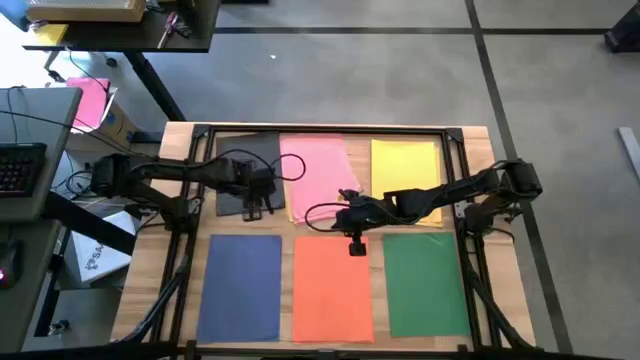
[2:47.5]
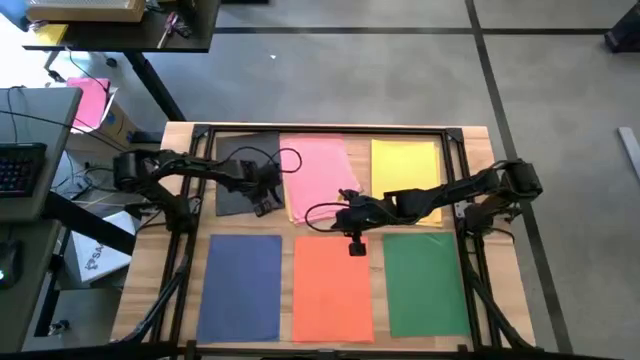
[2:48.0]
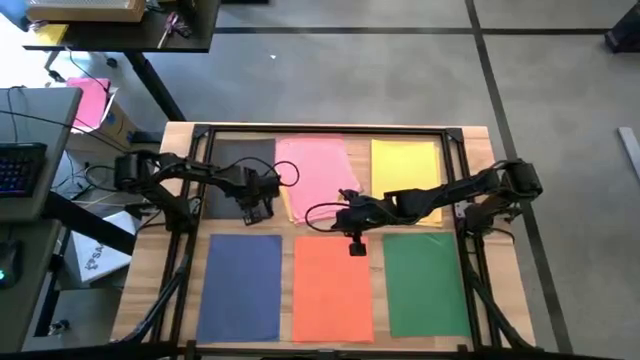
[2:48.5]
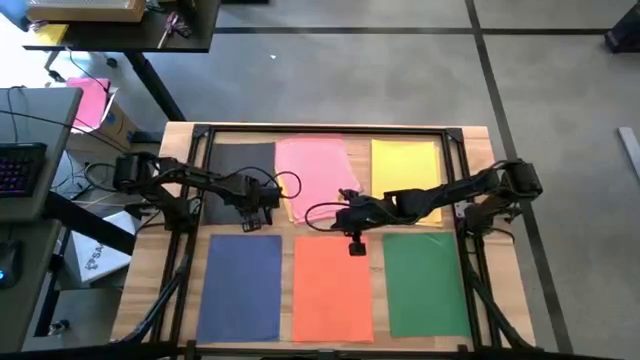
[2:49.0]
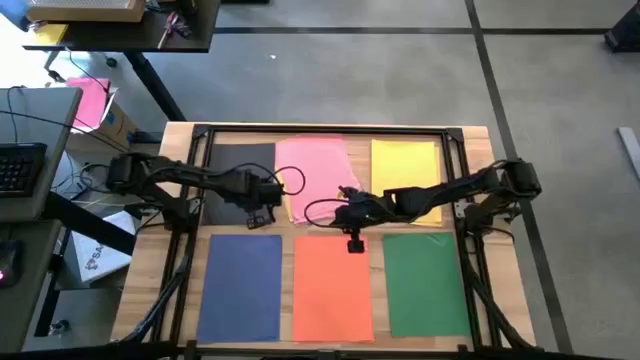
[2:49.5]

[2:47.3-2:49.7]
Task: Organize paper
Adjust the black paper

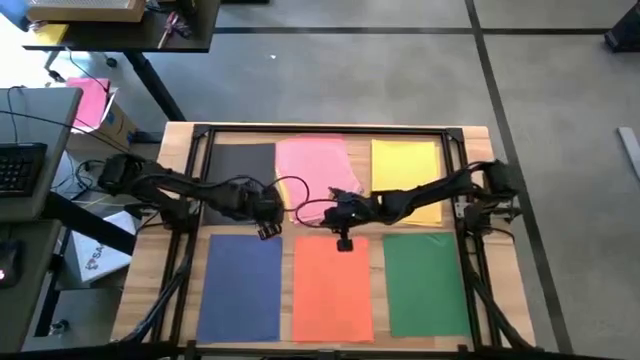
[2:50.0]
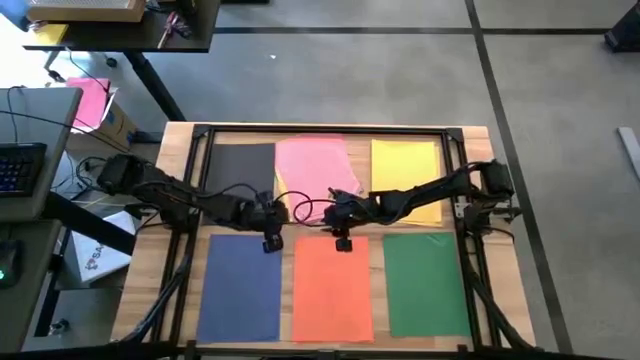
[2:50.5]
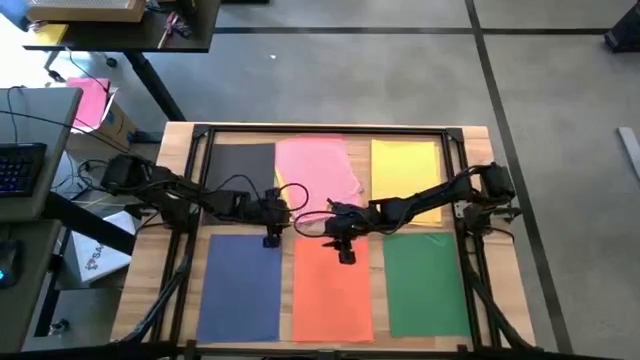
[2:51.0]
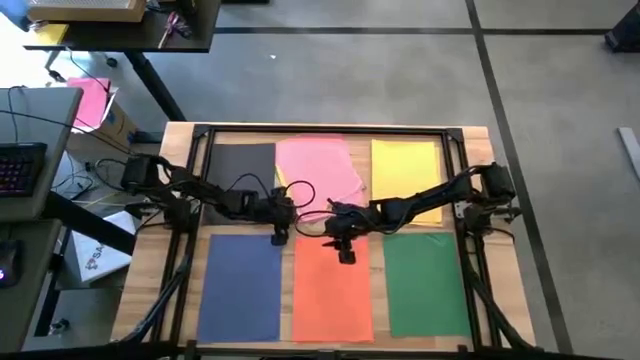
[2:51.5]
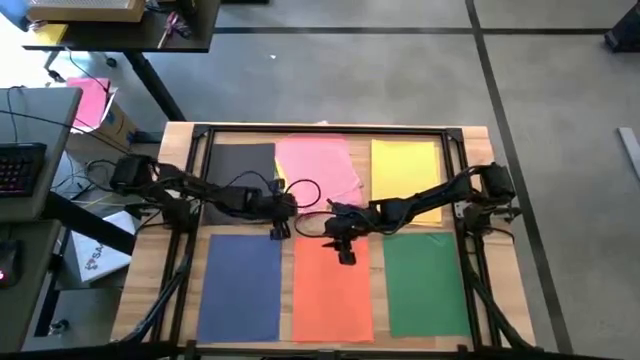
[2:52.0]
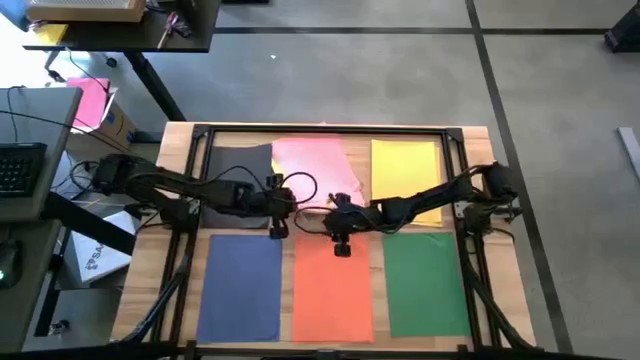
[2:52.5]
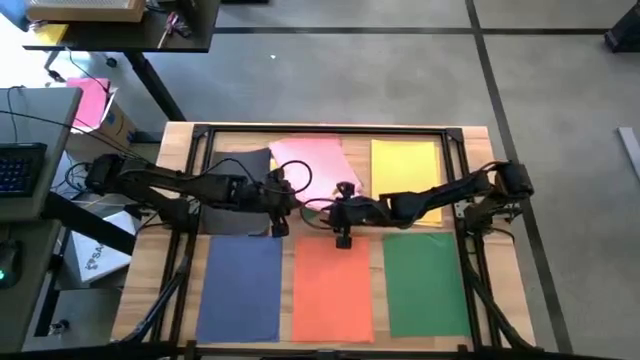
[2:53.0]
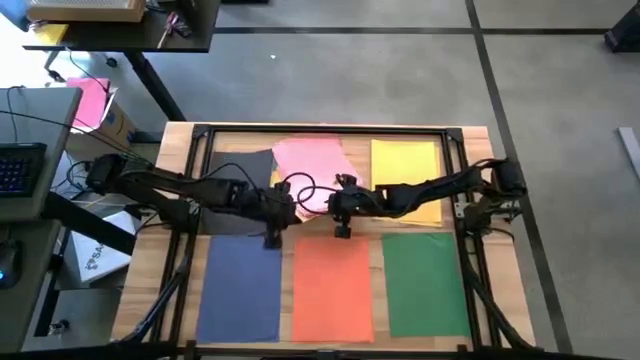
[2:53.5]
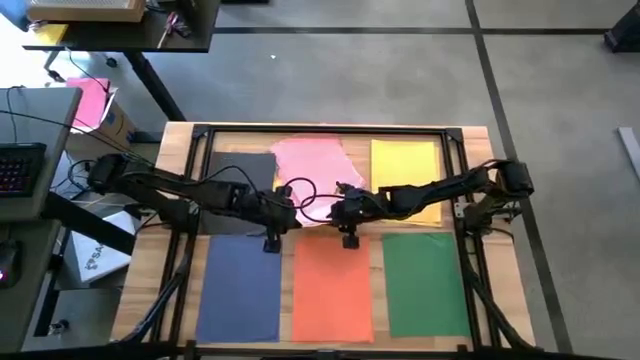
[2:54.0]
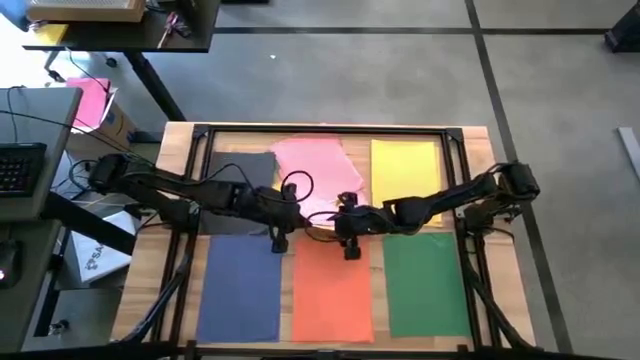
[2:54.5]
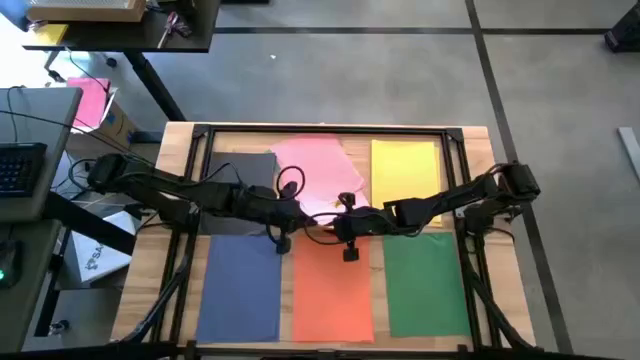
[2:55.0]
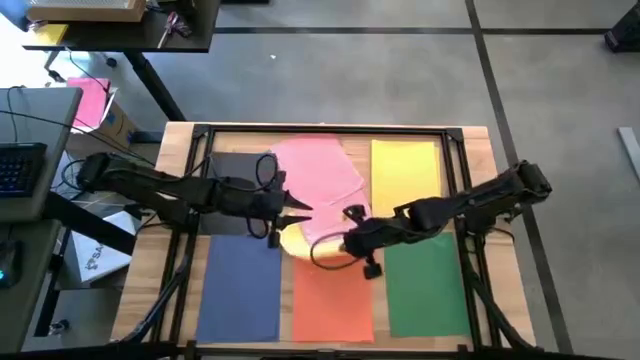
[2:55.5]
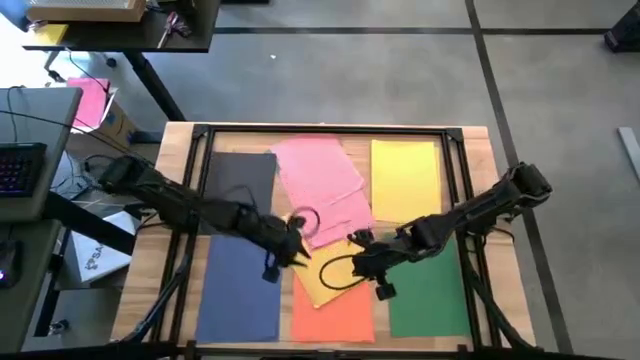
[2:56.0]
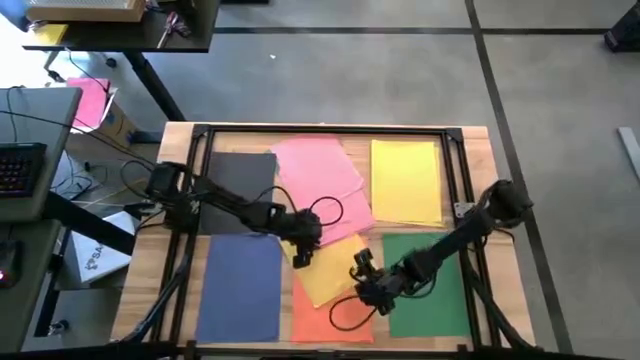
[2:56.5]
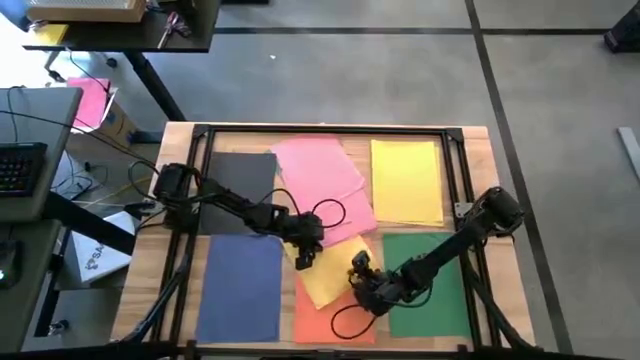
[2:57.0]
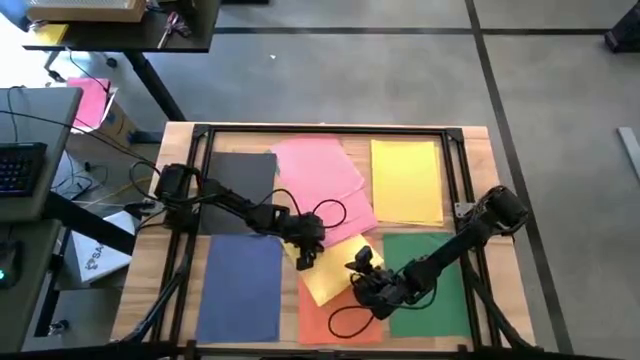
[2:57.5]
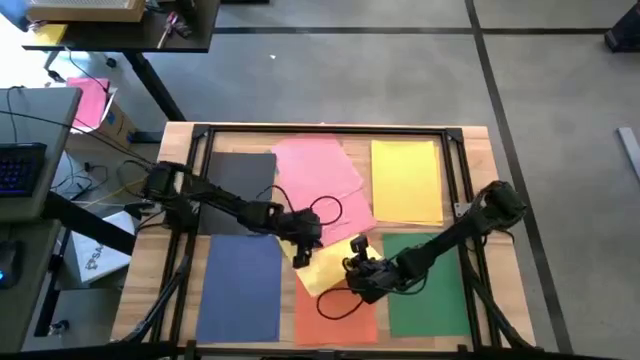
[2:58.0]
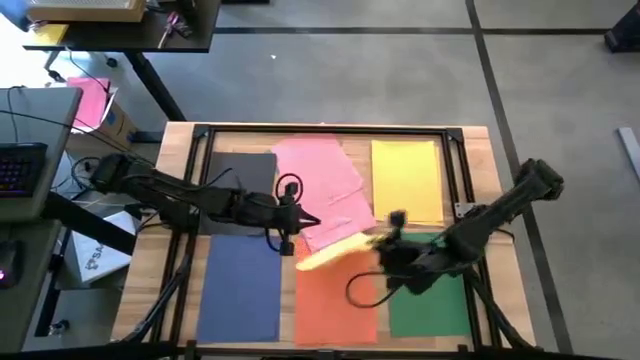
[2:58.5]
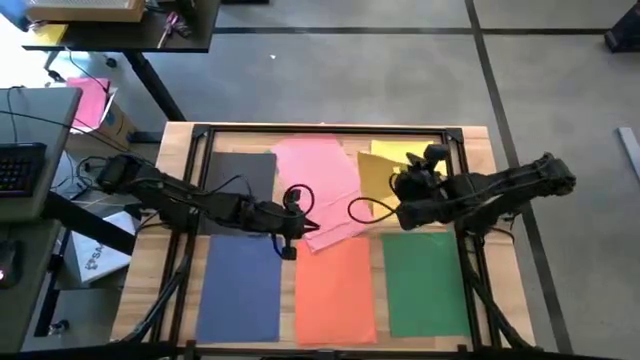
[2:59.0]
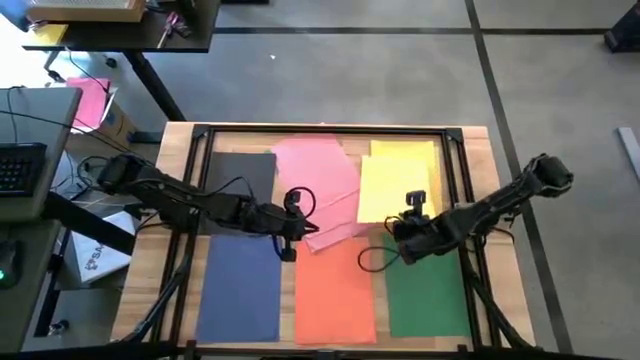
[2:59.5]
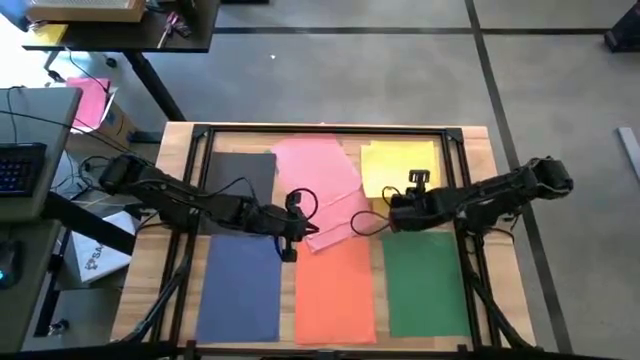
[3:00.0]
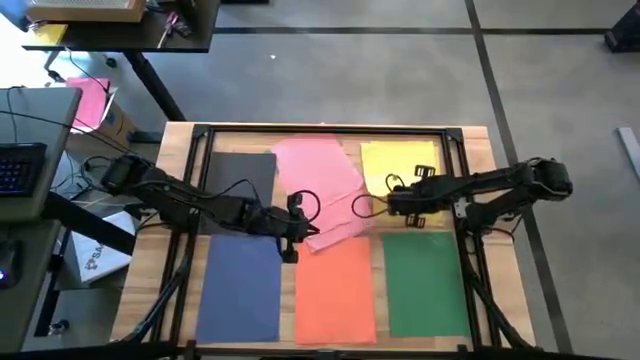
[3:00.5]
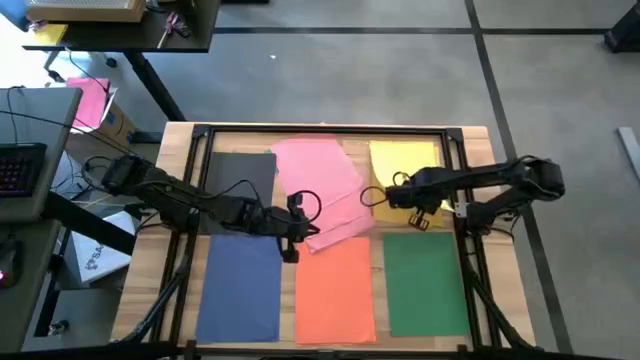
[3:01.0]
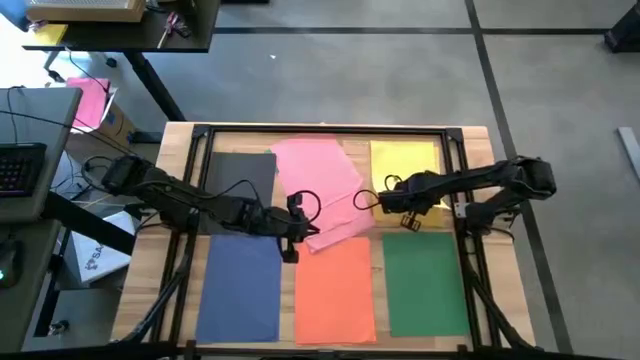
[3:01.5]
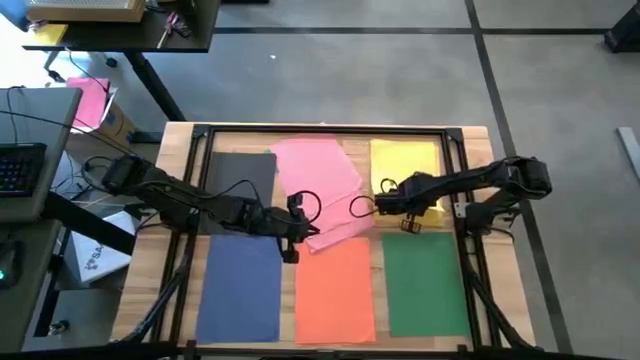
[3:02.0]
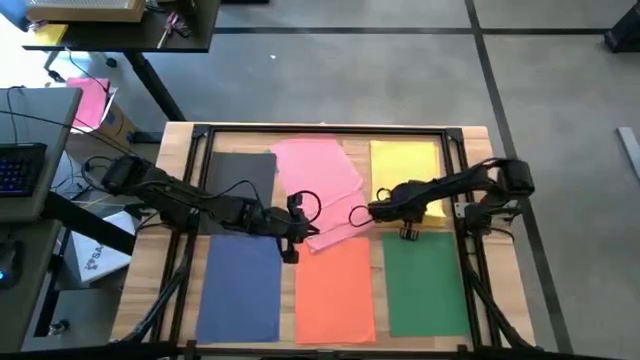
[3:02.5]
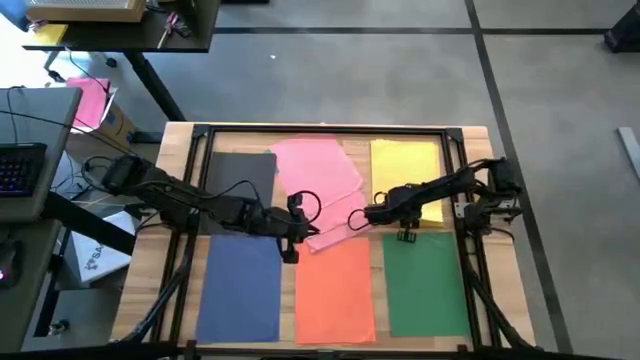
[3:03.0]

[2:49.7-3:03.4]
Stack the yellow paper on top of the yellow paper

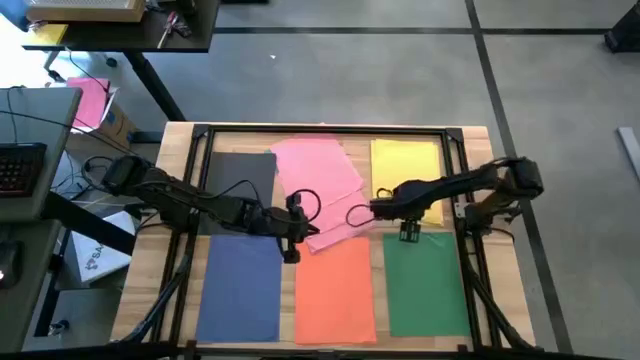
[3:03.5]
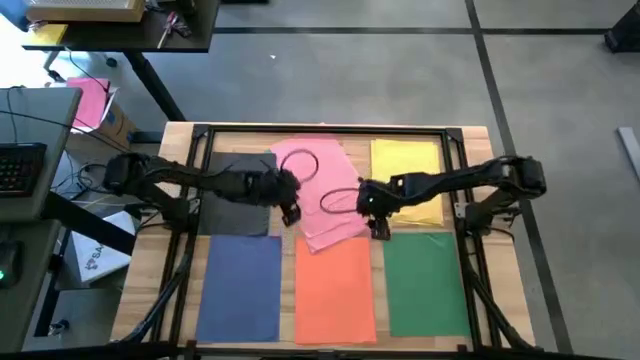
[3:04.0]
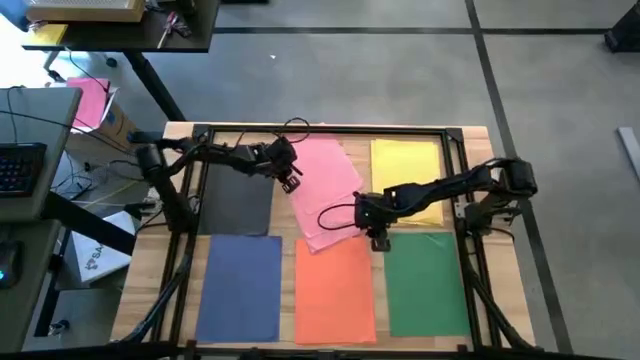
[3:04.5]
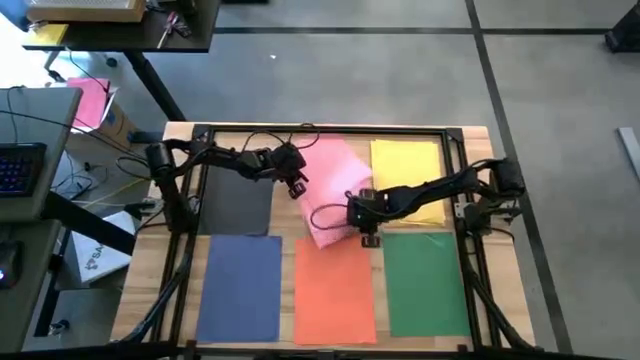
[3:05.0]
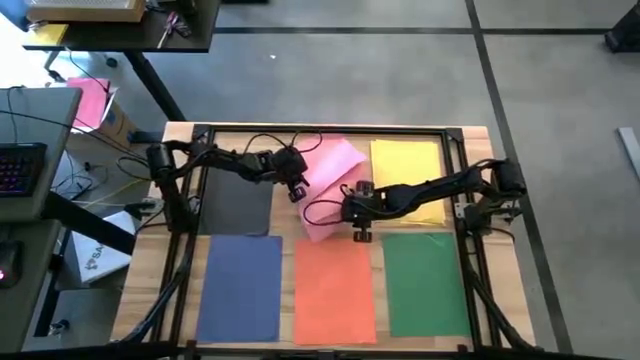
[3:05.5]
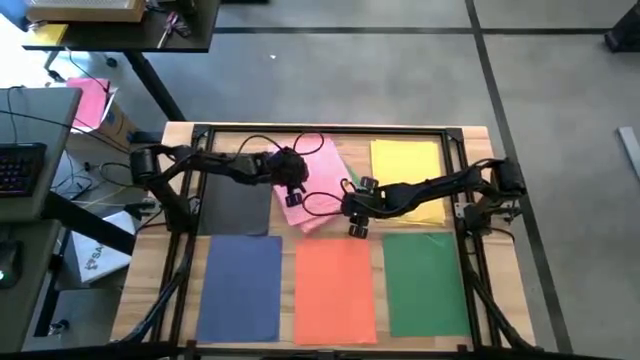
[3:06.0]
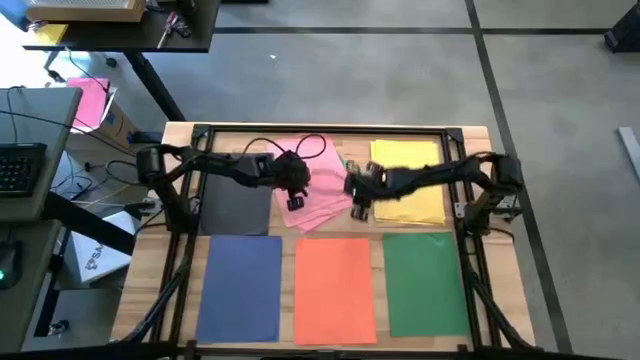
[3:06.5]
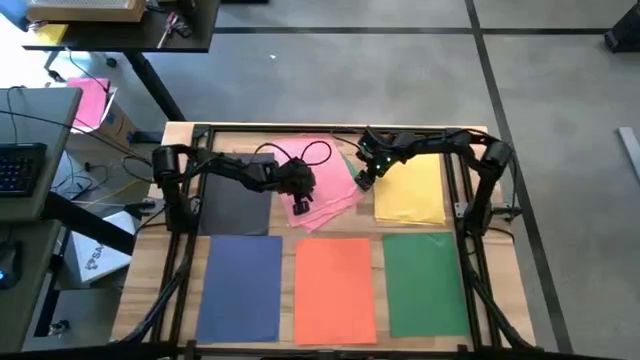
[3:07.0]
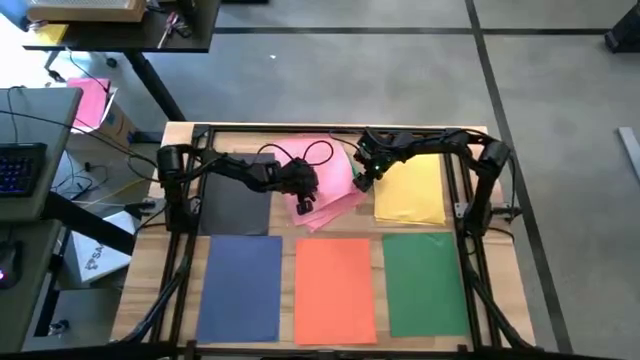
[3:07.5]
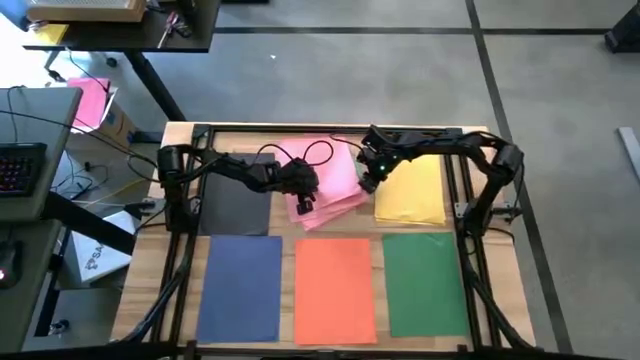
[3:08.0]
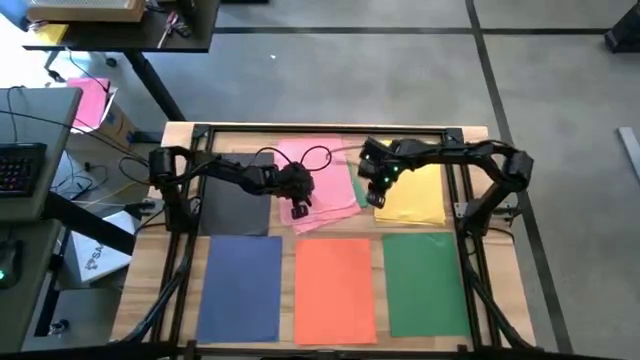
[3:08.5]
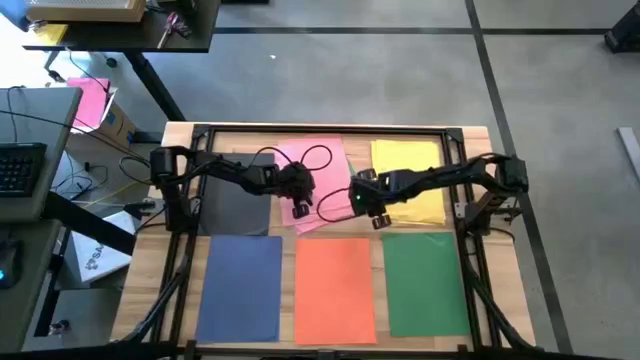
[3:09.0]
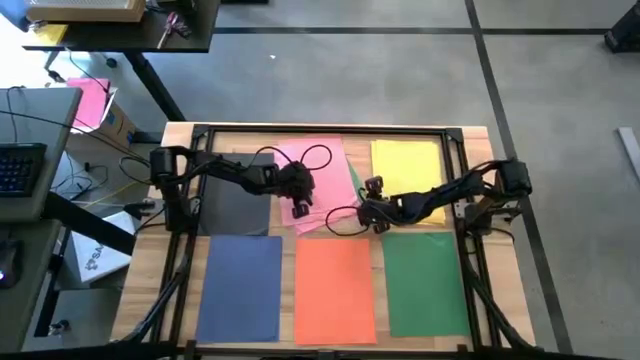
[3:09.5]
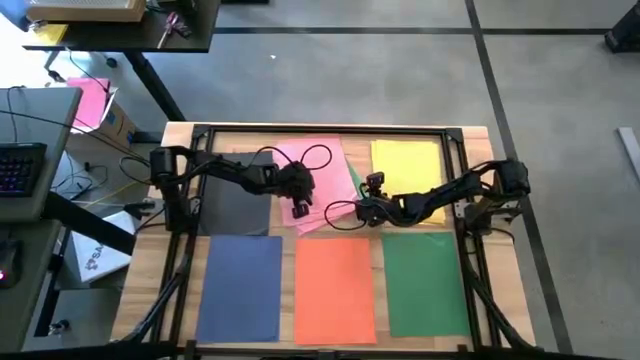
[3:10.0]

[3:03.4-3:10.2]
Stack the green paper on top of the green paper
